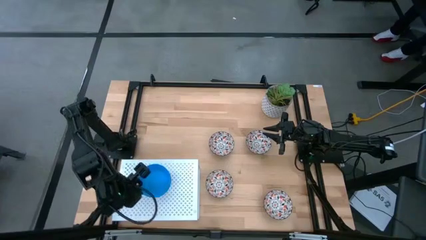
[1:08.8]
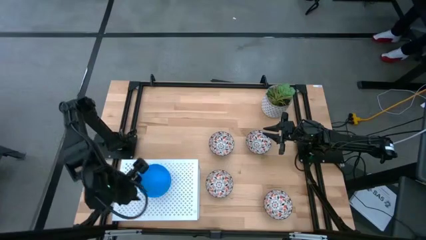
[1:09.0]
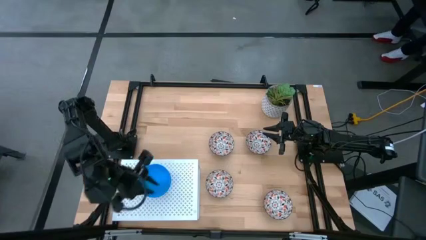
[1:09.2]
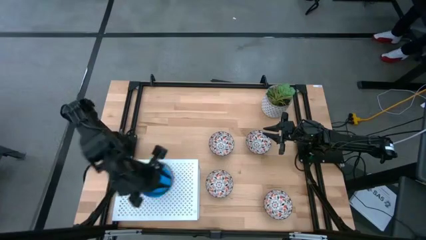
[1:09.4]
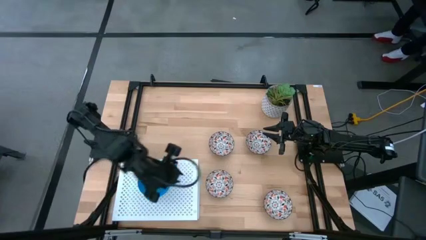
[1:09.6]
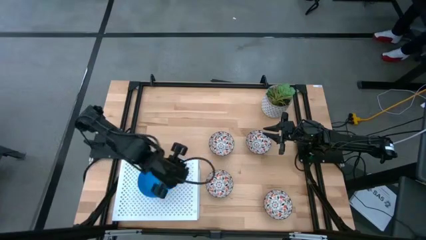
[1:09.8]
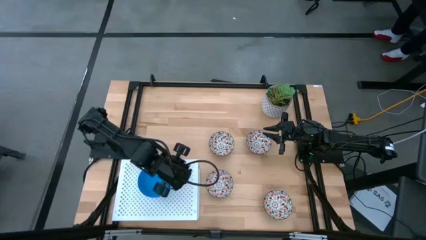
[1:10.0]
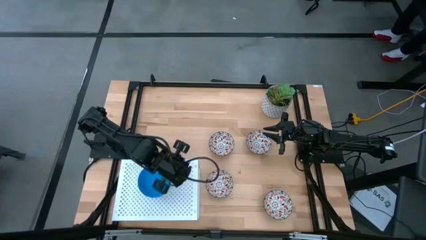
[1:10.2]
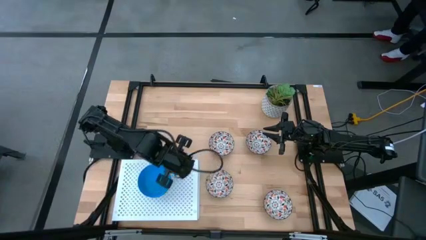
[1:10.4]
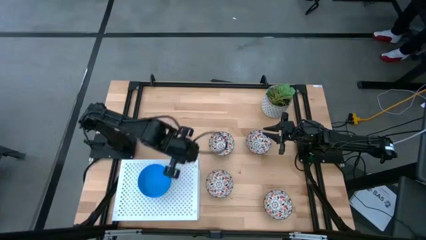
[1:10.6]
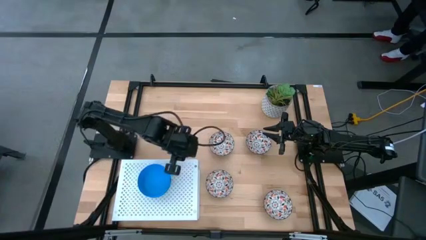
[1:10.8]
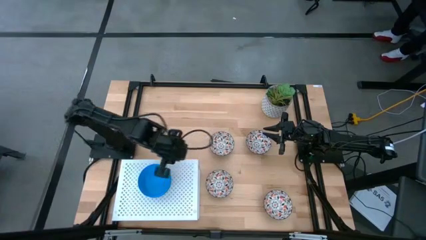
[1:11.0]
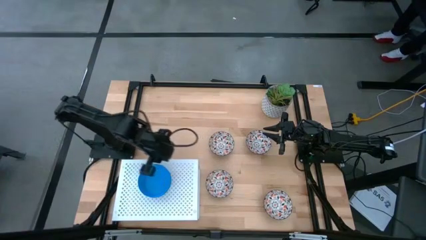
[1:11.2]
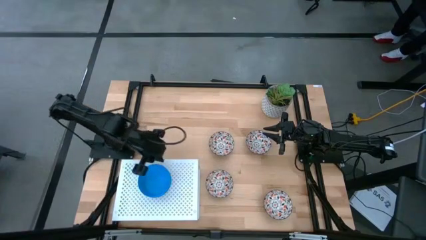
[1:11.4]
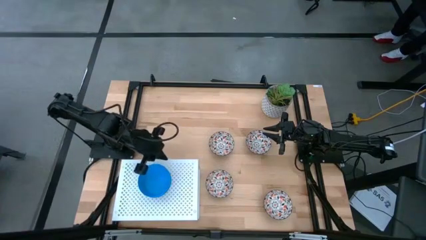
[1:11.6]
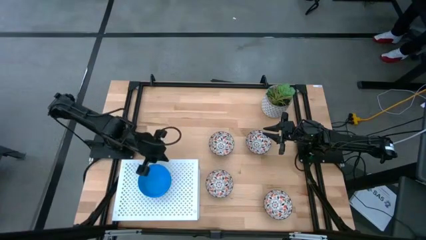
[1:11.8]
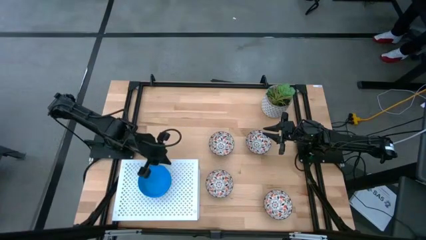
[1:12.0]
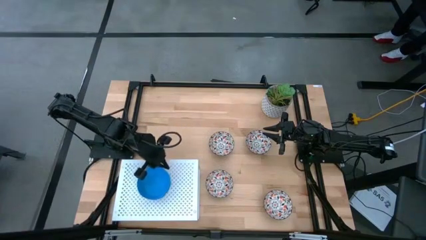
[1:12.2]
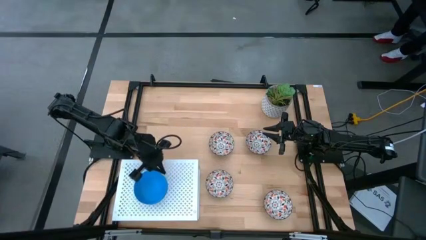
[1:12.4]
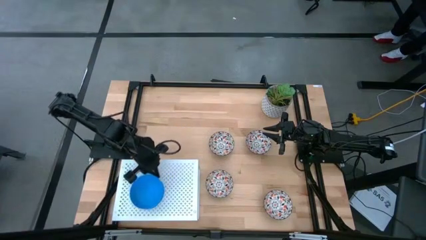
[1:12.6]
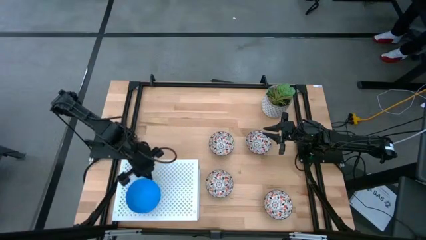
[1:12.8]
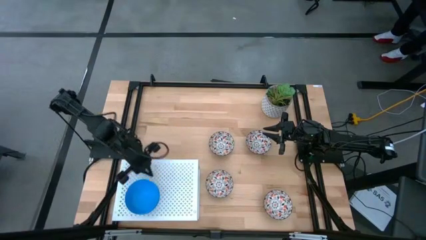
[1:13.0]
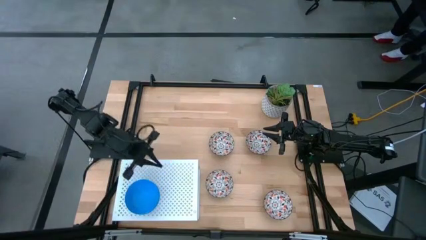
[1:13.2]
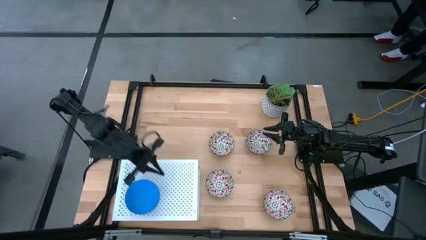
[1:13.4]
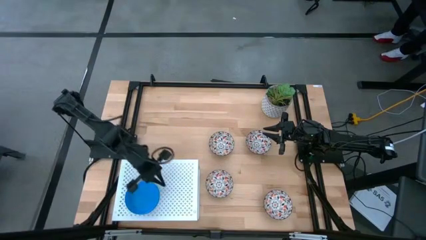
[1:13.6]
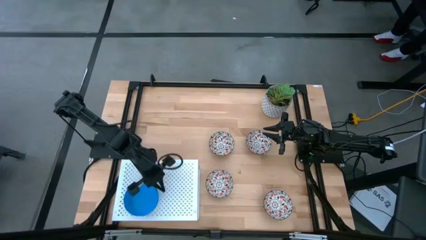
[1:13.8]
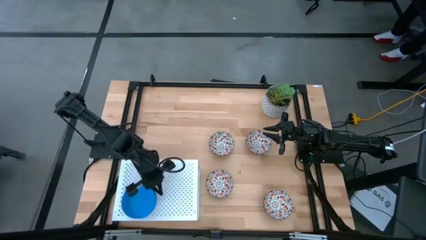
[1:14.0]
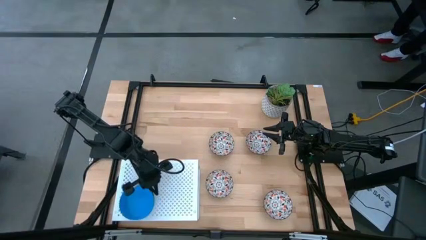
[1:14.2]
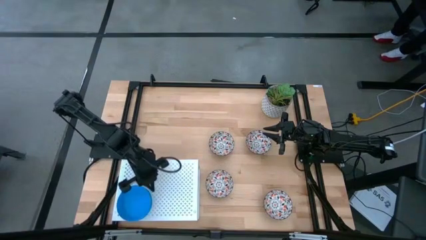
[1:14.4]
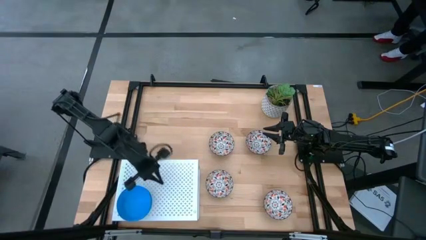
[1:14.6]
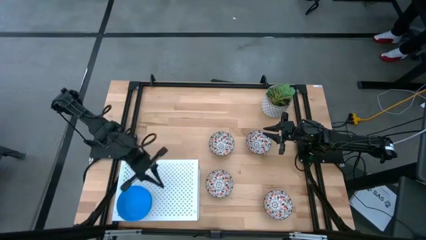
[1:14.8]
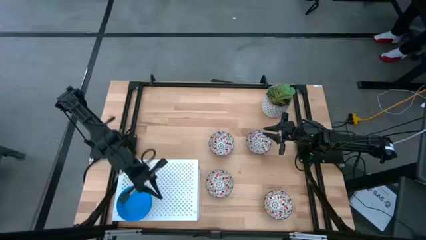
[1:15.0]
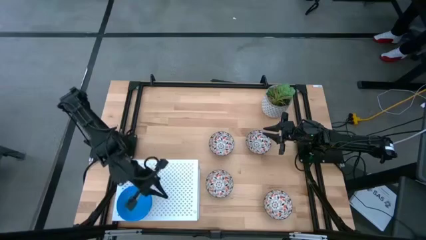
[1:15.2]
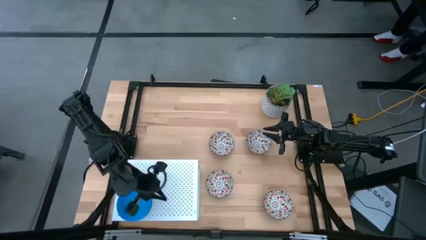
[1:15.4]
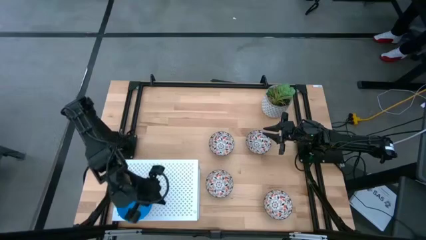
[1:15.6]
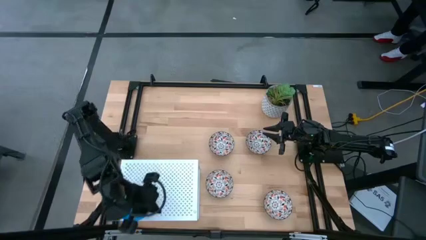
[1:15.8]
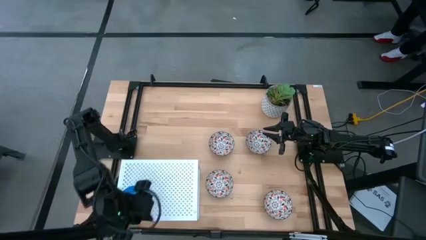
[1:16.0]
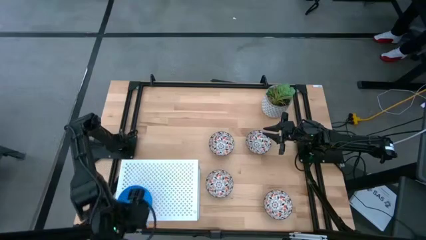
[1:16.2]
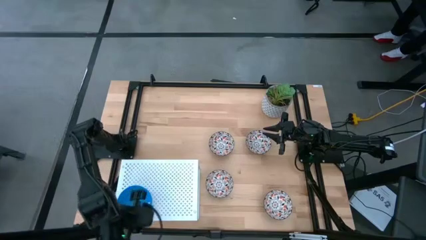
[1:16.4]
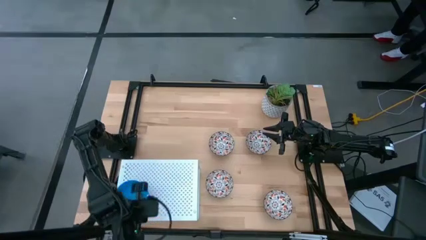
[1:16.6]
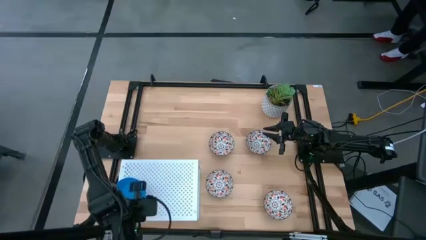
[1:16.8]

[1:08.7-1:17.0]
Task: Pick & Place Mini bowls
Adjust the stacked blue bowls

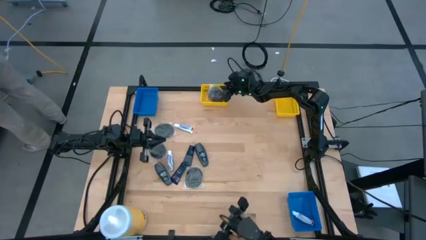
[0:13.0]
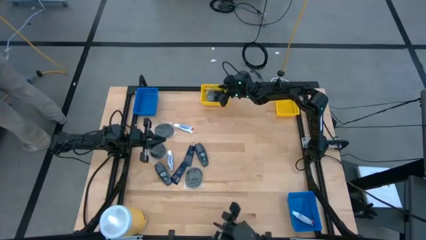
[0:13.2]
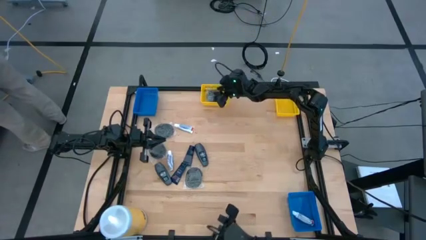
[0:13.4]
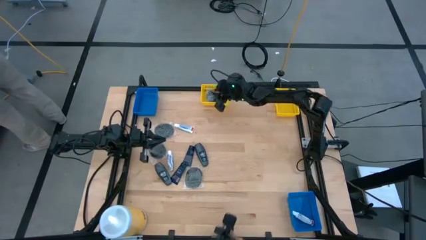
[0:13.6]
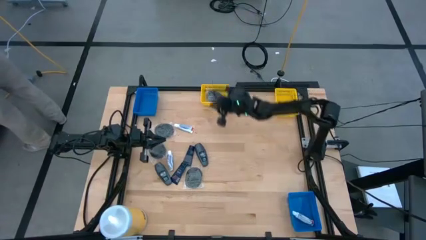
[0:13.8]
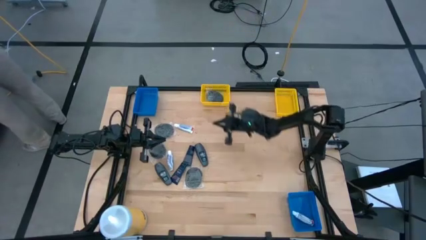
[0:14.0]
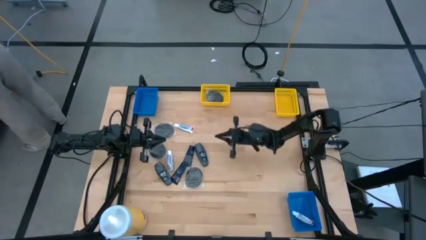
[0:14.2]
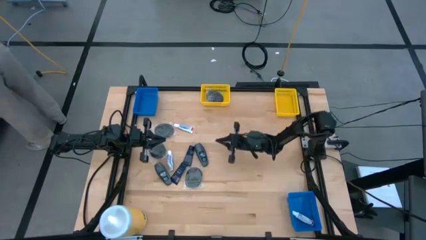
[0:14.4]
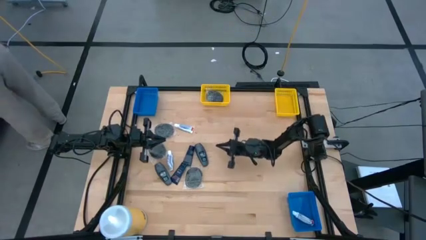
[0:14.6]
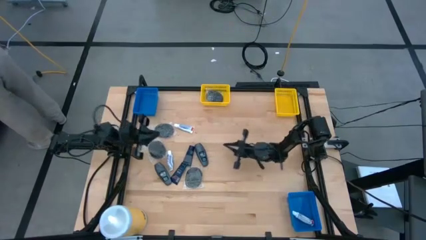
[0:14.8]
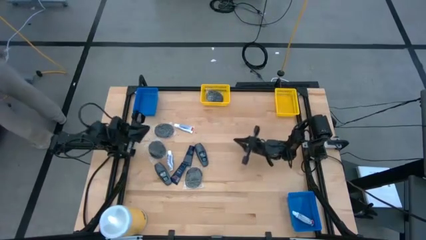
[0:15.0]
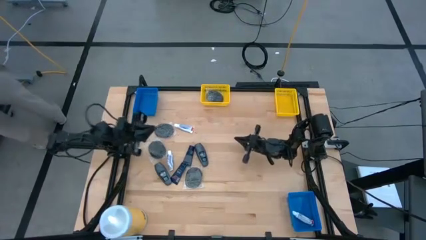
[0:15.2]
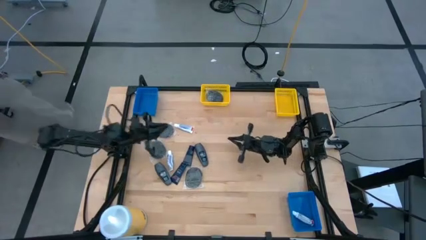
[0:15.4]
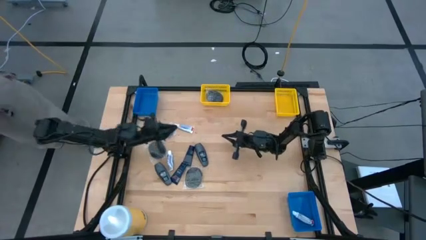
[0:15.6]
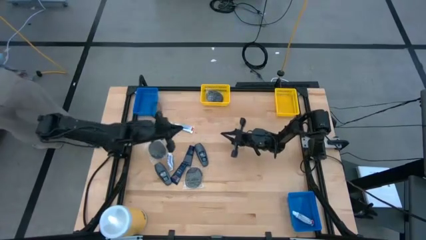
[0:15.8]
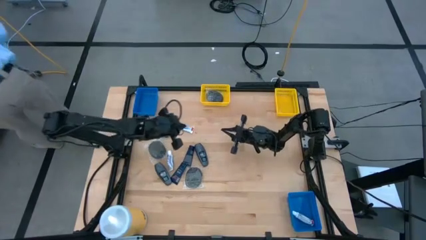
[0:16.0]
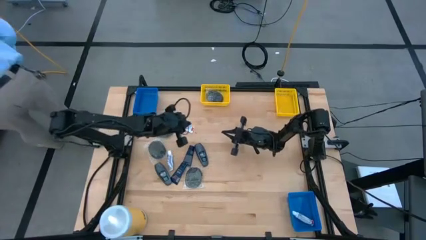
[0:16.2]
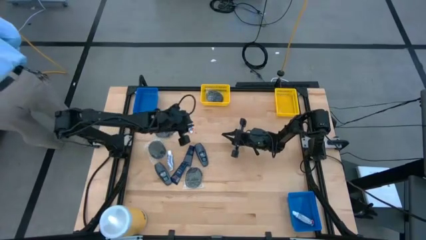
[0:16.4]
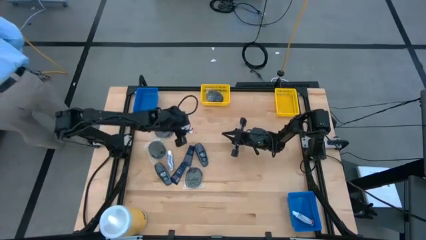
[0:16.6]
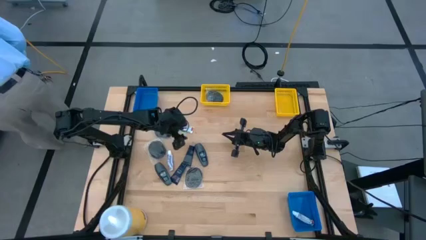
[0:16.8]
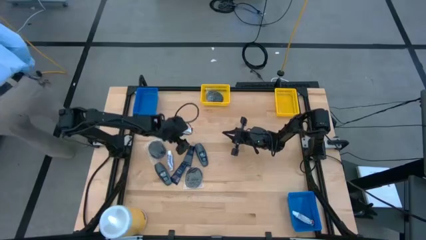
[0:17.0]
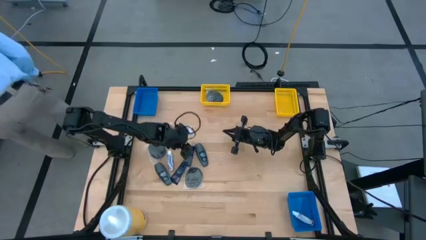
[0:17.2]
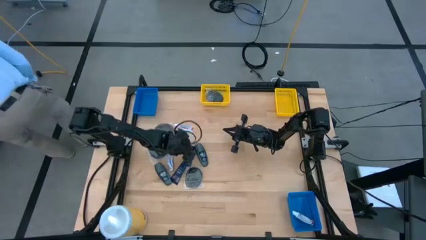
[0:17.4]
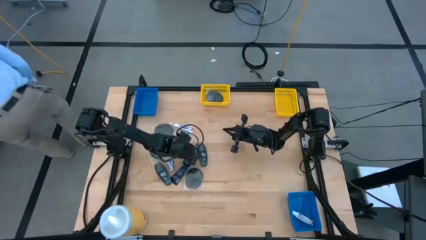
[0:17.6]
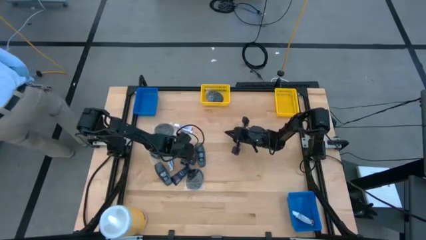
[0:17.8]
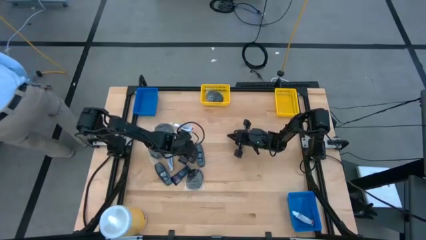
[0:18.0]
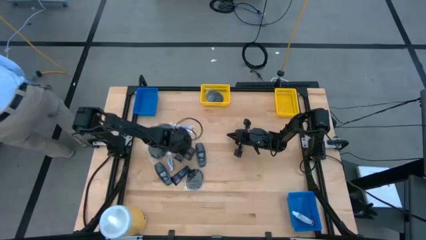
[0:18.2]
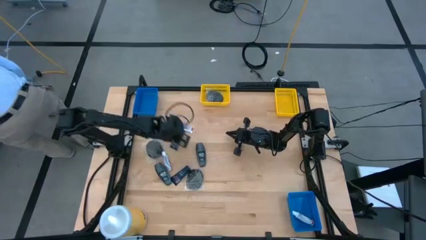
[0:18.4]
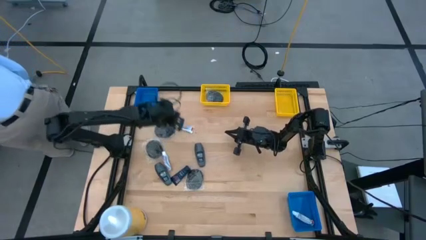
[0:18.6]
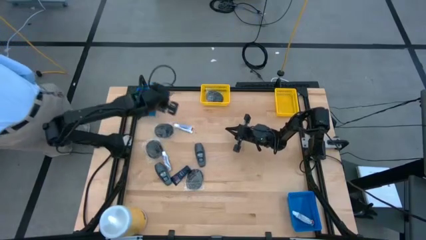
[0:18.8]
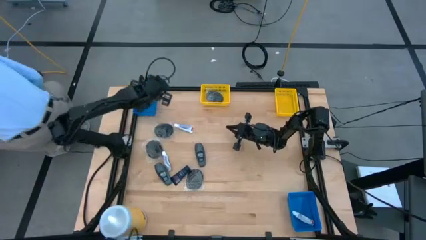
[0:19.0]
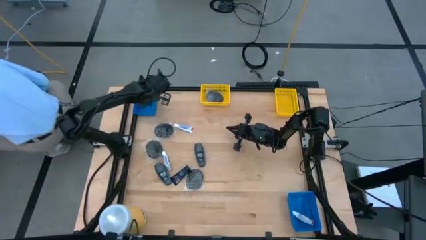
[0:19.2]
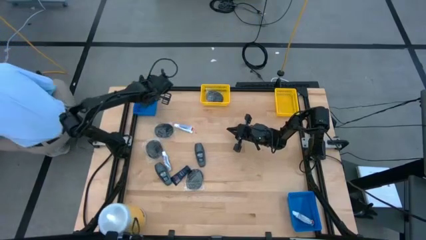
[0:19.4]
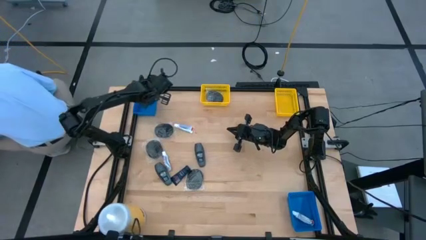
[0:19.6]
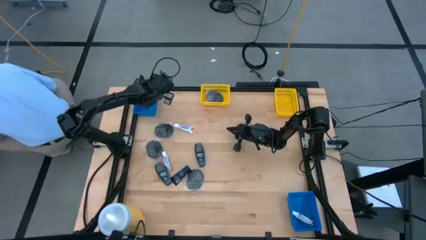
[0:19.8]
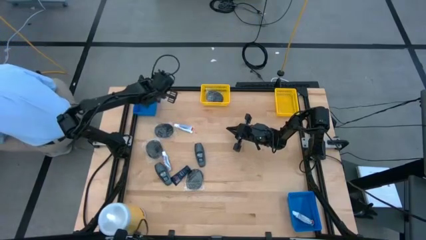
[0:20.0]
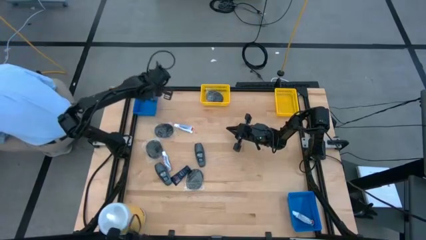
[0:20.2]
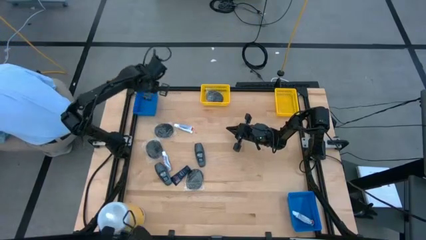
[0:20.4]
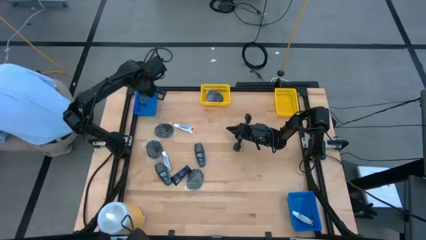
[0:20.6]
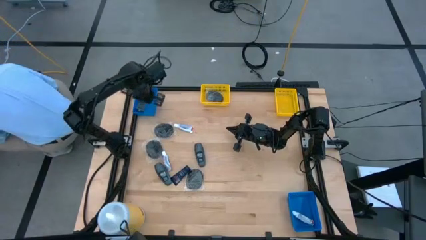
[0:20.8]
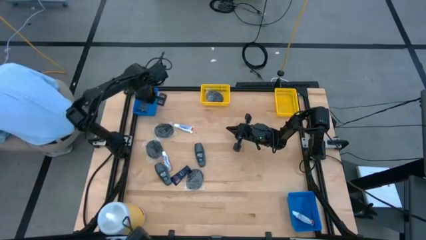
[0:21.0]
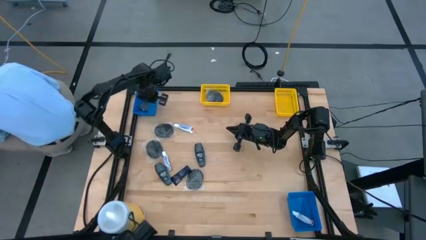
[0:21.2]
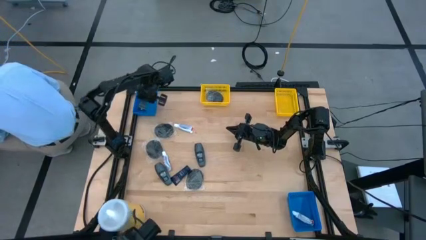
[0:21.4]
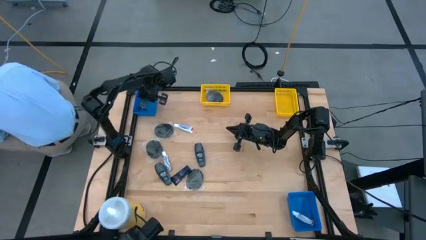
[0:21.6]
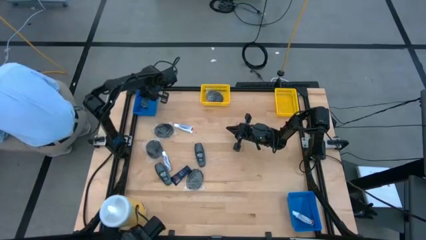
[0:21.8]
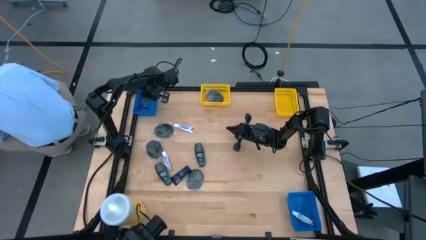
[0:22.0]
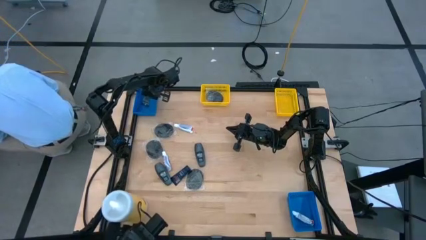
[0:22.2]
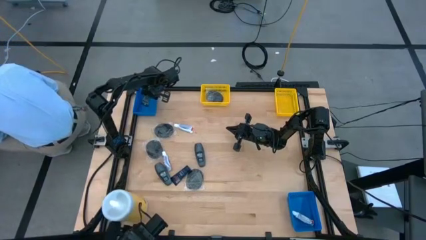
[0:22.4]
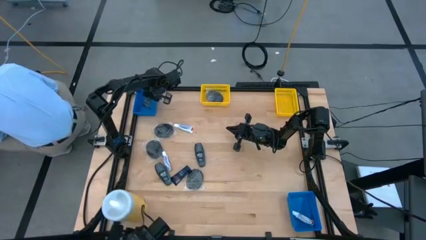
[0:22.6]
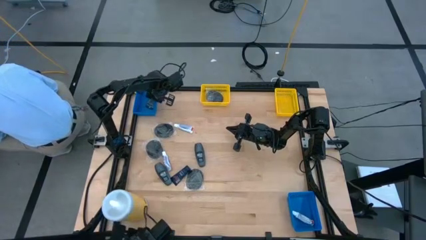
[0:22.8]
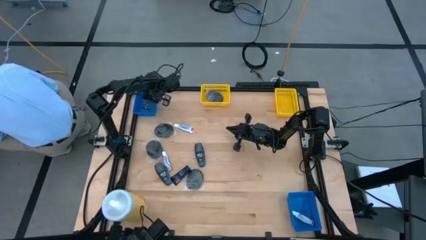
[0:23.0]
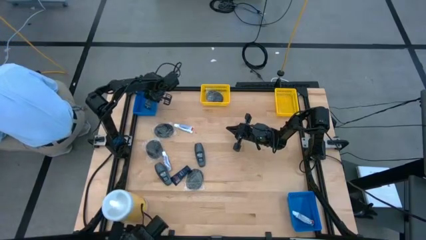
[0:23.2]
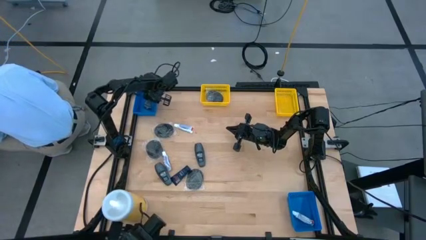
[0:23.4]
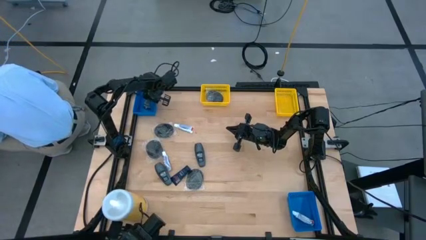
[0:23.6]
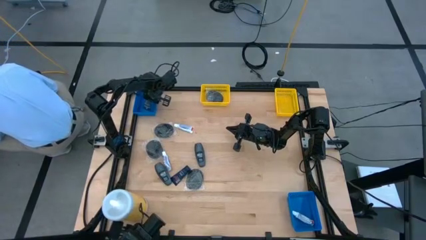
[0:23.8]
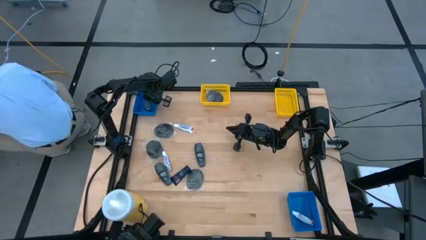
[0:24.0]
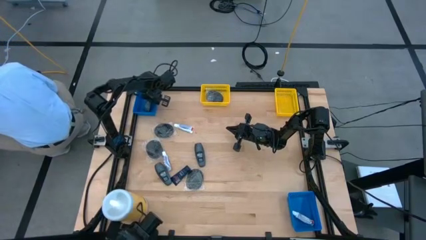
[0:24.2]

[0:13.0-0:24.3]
Task: Pick & Place Travel size toiletries
Put the top shaving cream into the top blue bin
